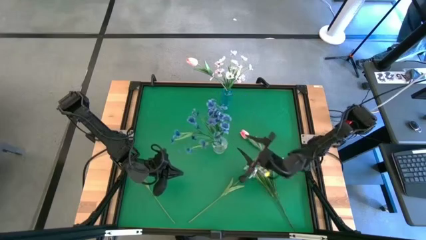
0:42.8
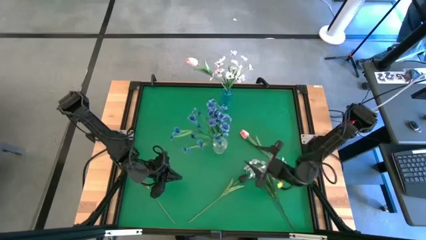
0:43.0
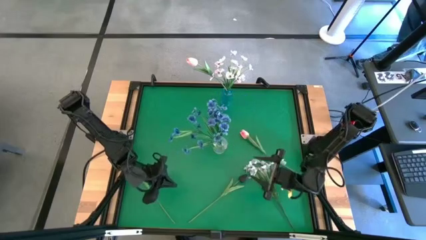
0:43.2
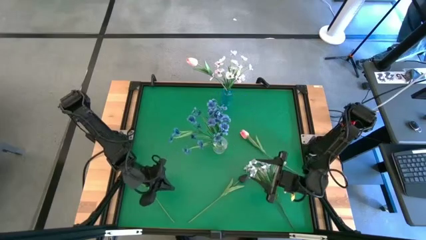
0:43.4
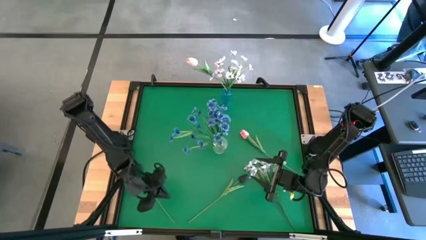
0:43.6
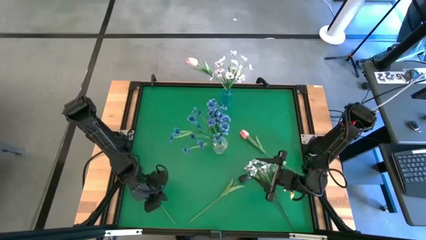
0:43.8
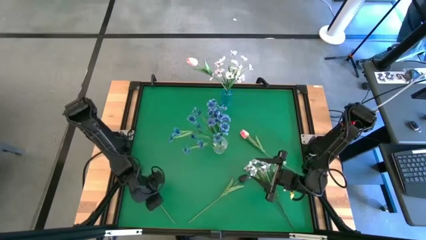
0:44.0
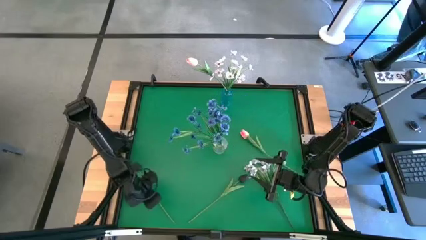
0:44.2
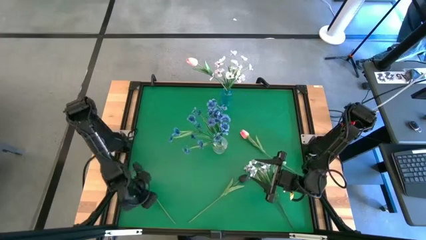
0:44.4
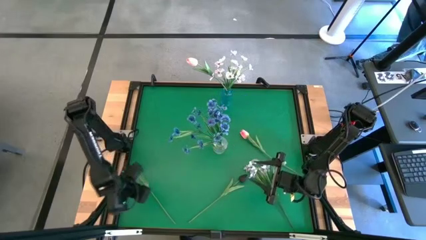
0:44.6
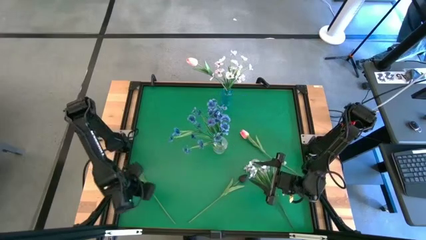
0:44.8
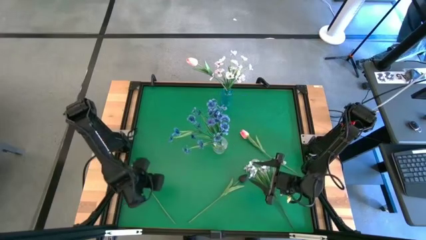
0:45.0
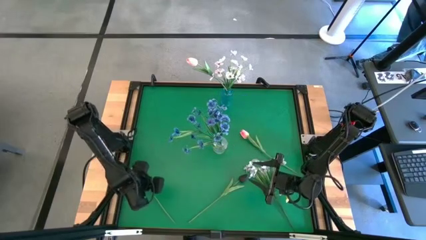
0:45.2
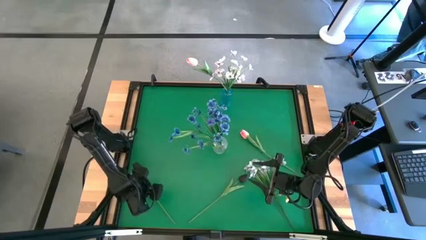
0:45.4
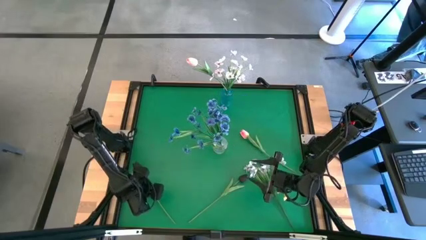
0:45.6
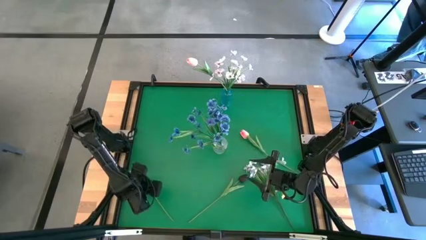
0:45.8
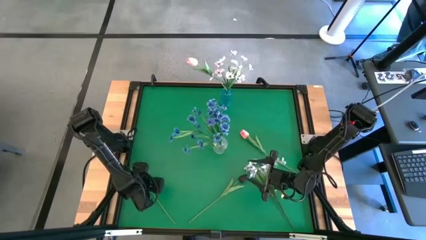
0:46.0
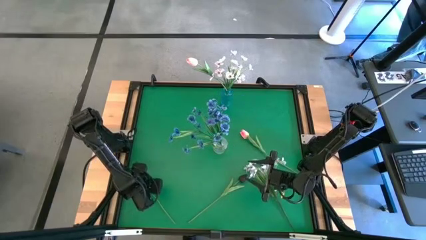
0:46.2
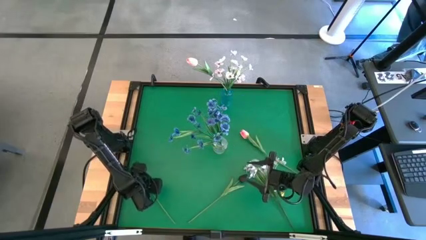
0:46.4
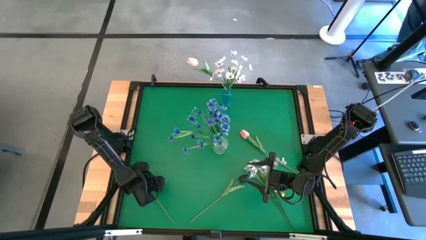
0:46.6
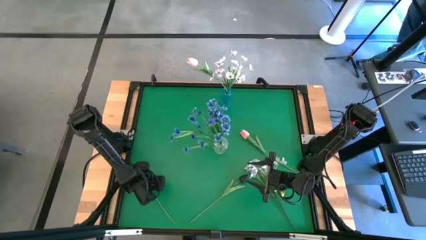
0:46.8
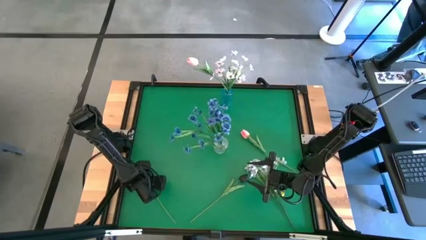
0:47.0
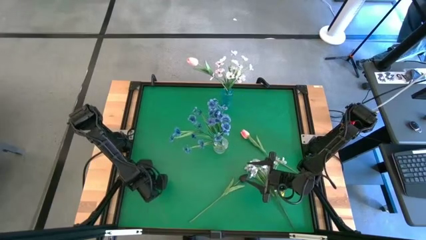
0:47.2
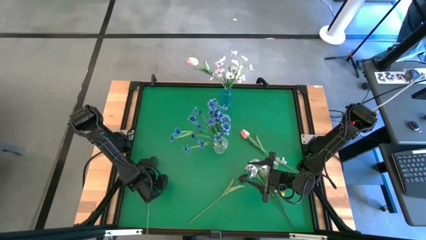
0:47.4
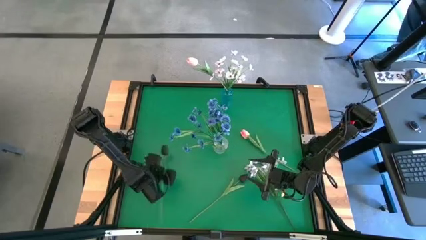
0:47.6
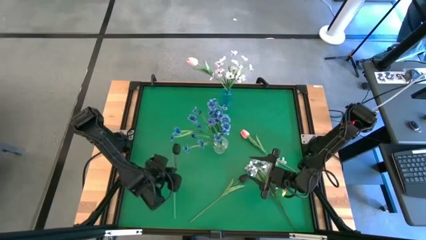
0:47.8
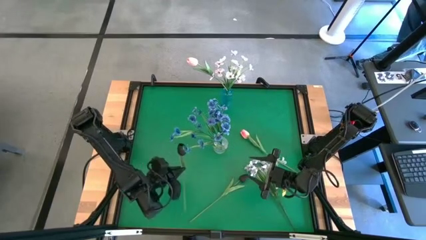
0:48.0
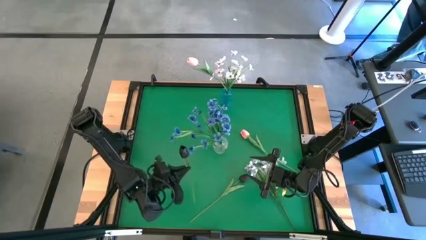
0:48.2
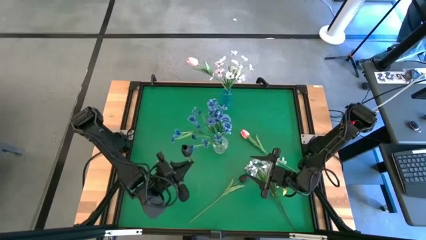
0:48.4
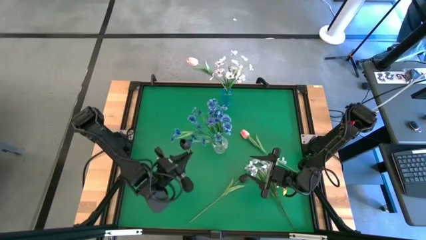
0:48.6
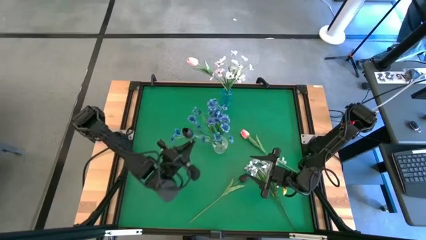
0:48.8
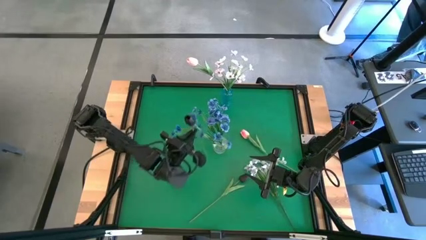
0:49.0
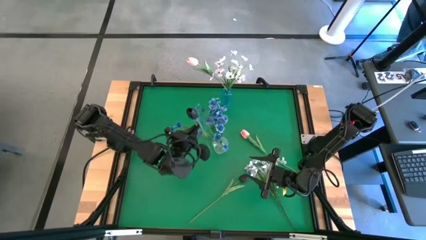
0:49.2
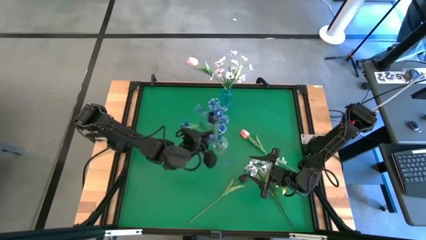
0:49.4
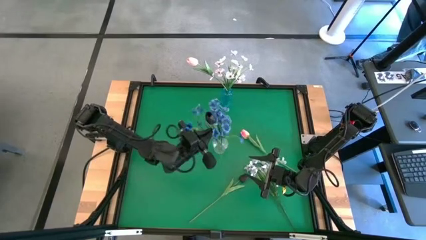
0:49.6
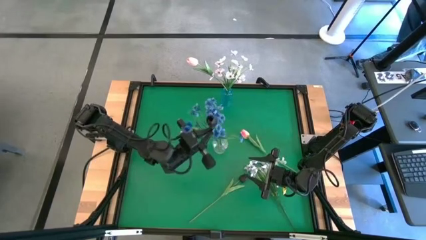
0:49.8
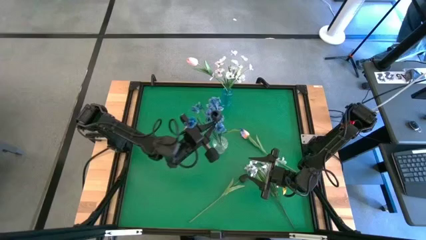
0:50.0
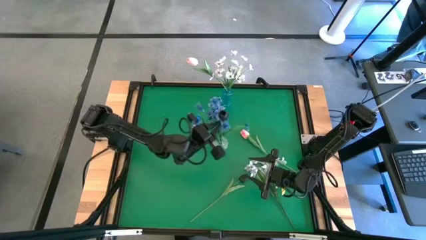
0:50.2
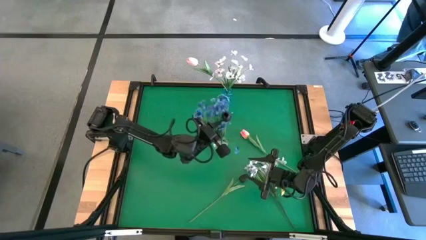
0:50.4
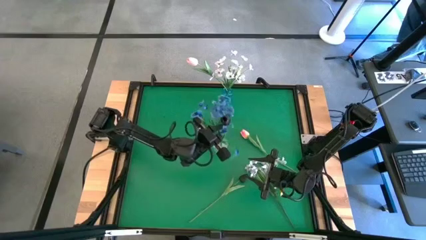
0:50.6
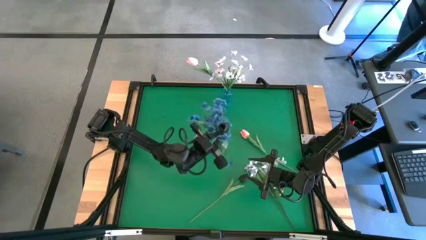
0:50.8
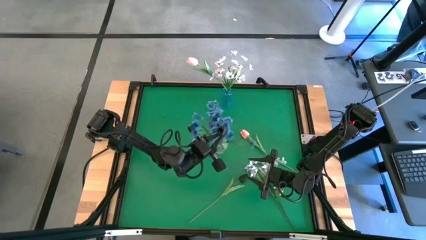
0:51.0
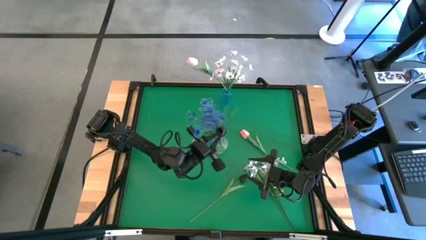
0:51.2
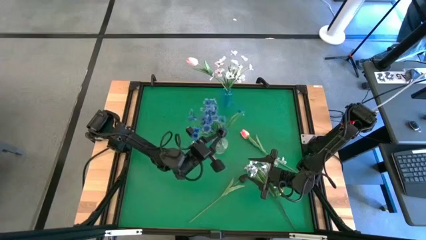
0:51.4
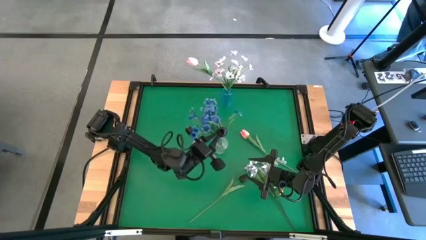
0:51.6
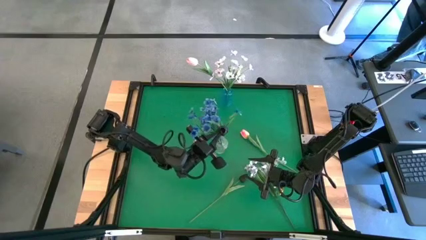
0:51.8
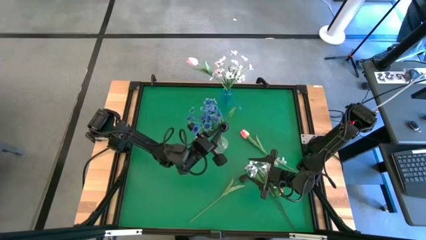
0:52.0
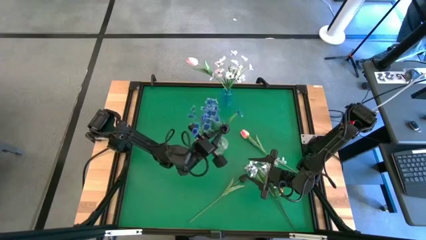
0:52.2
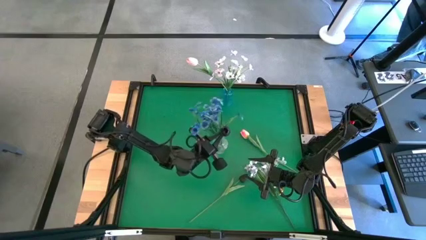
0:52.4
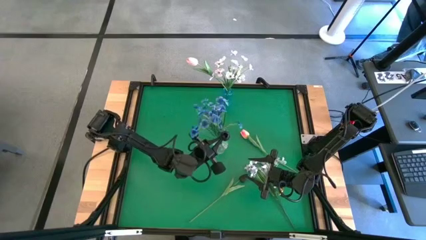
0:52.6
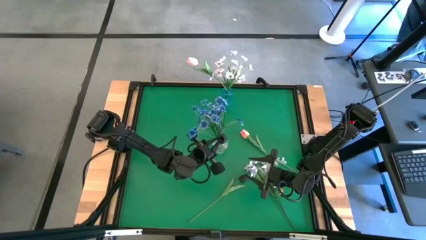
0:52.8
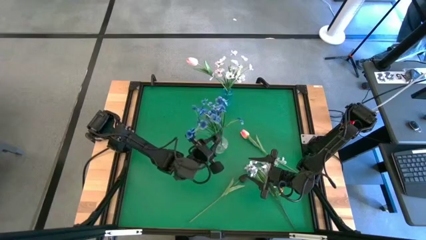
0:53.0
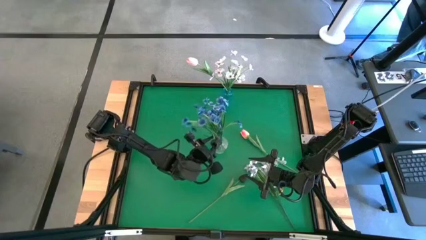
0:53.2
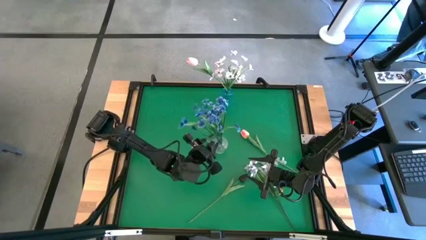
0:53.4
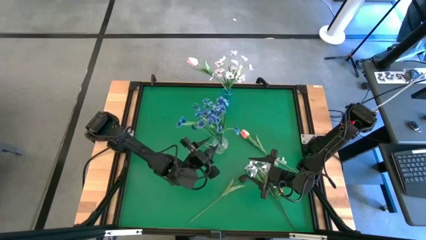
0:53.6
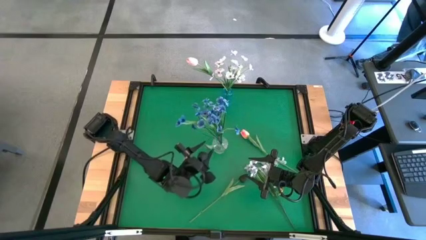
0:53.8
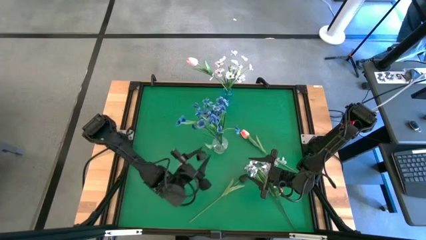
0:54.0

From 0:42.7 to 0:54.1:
Task: Sort flowers into vase by color
Put the left black flowers into the transparent vase
